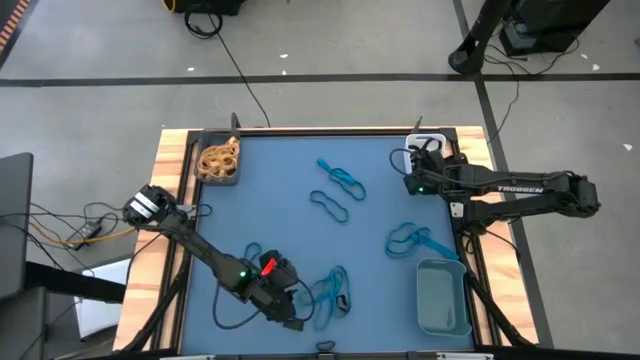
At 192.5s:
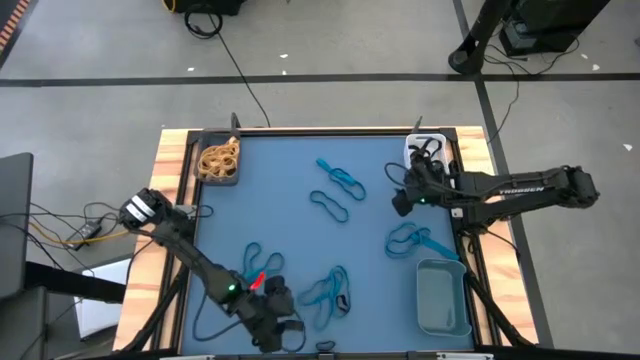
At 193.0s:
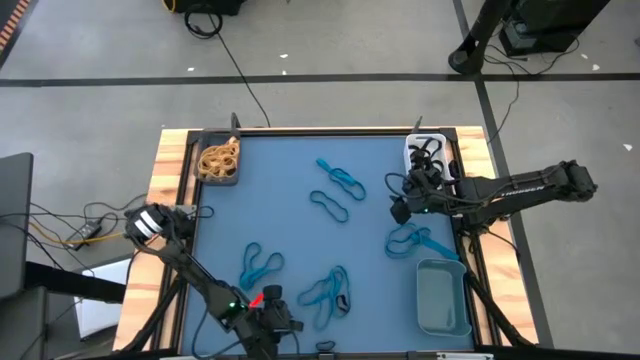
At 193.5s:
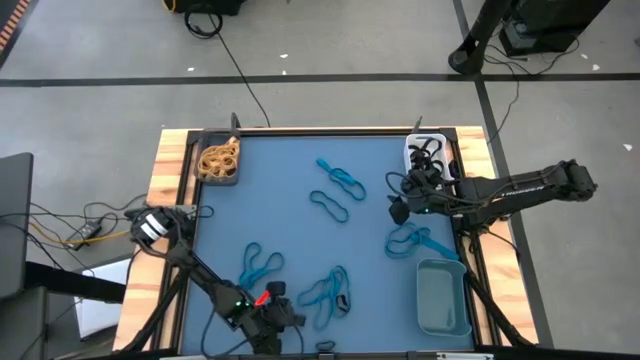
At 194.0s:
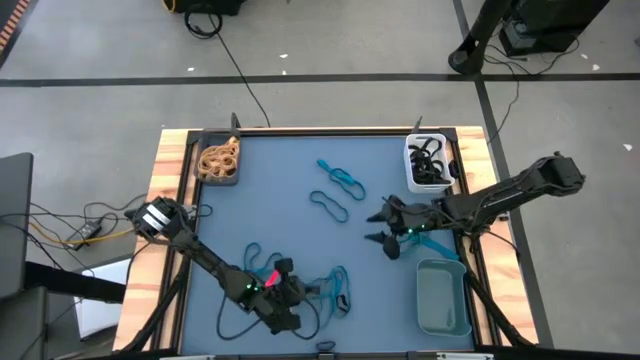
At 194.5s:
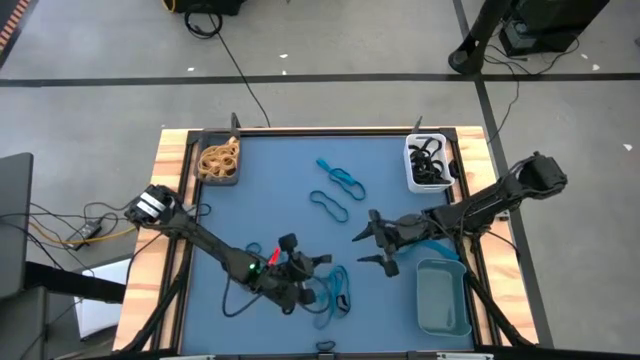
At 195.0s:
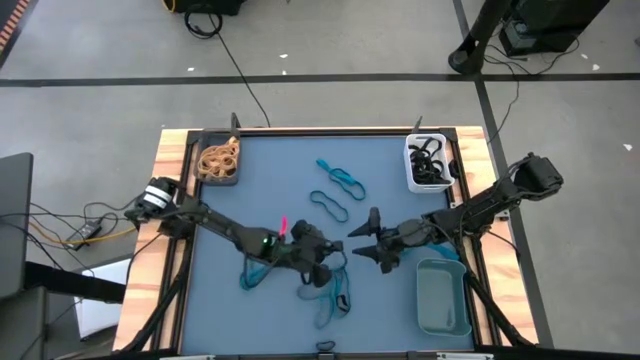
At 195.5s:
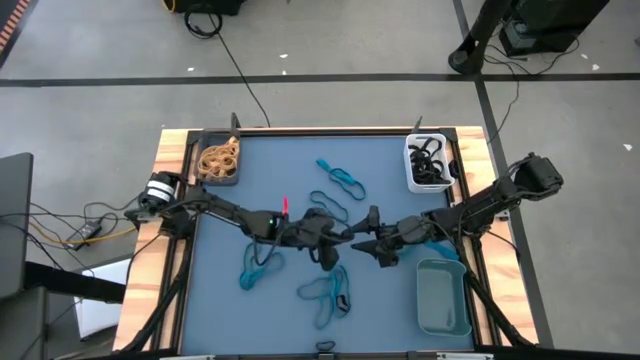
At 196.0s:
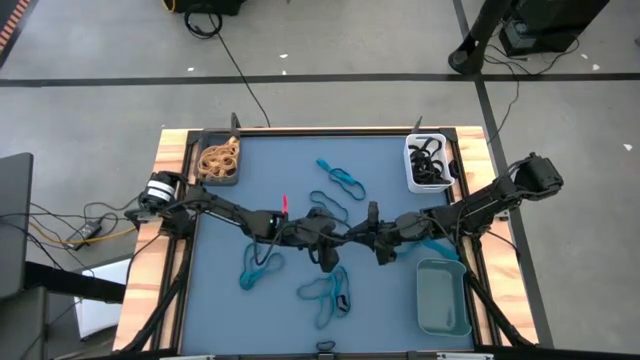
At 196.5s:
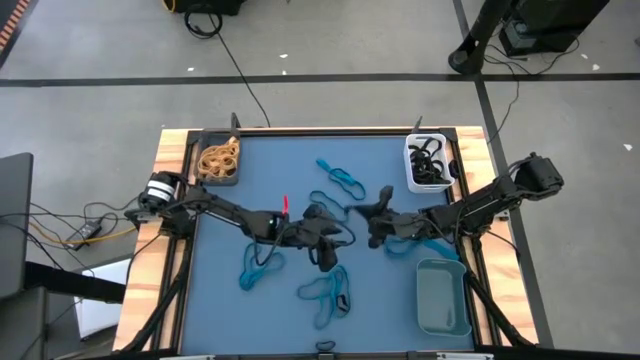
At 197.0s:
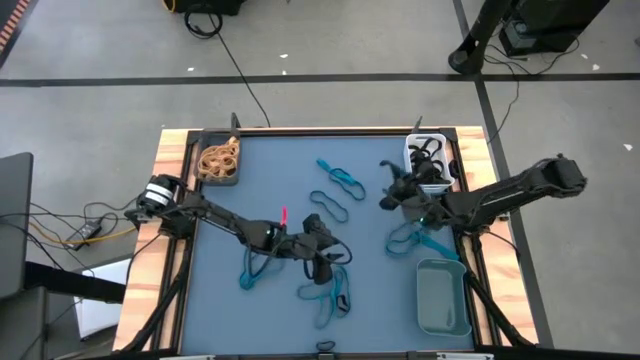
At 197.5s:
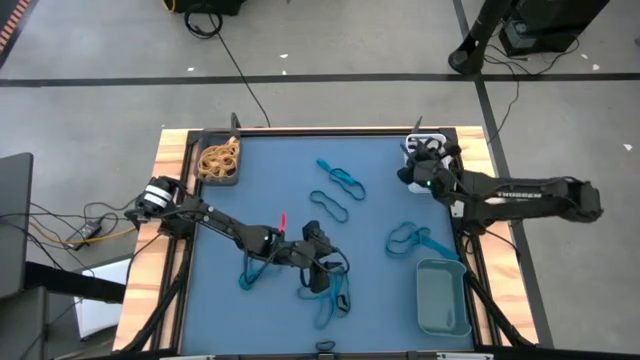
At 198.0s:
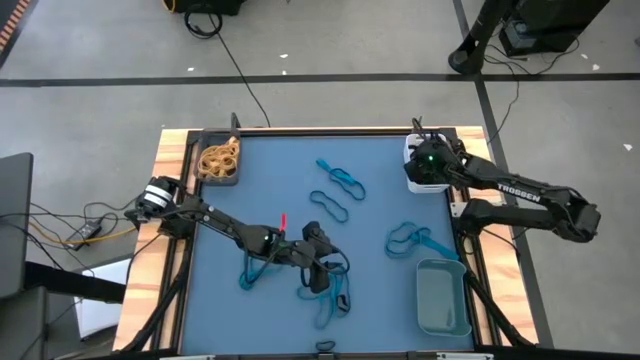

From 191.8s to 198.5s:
Task: Sort rubber bands into baskets
Put the black rubber band into the white bin

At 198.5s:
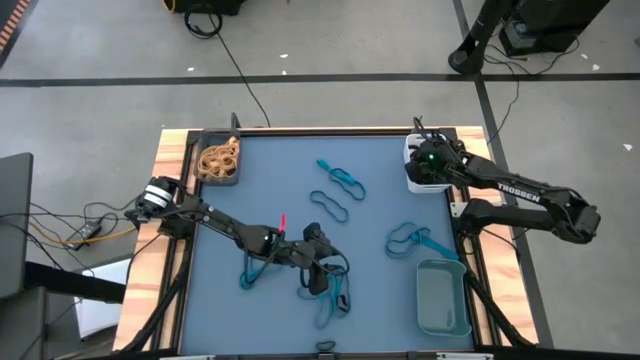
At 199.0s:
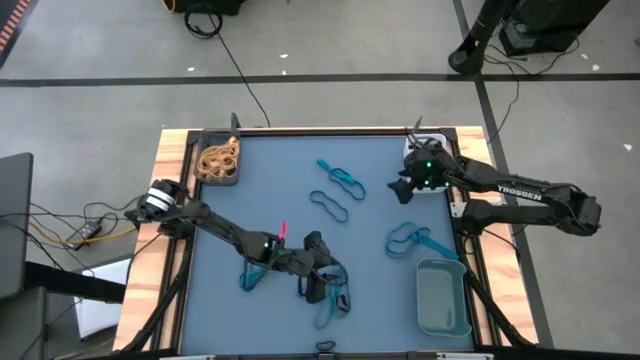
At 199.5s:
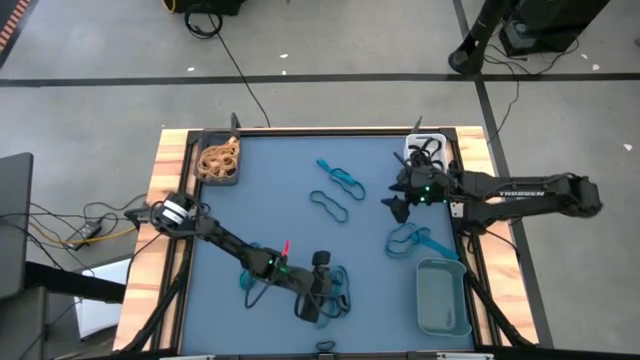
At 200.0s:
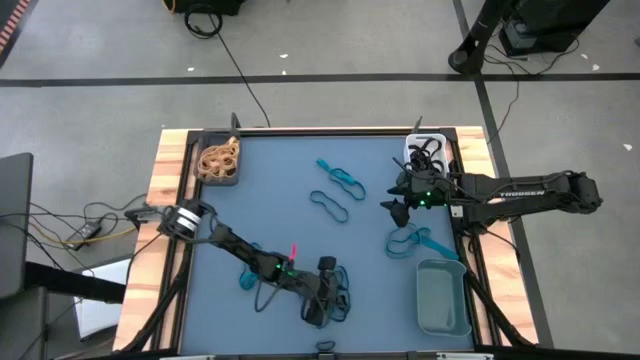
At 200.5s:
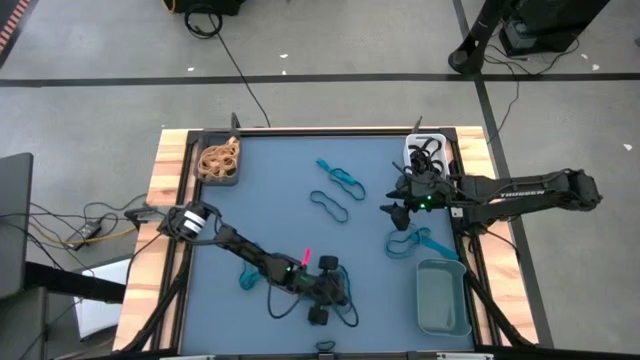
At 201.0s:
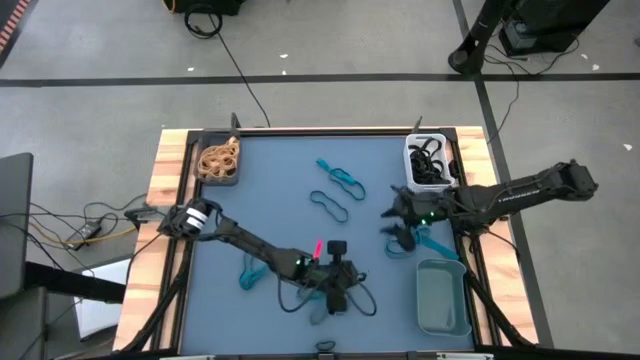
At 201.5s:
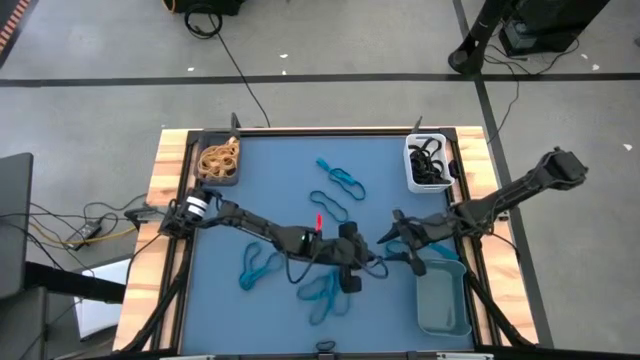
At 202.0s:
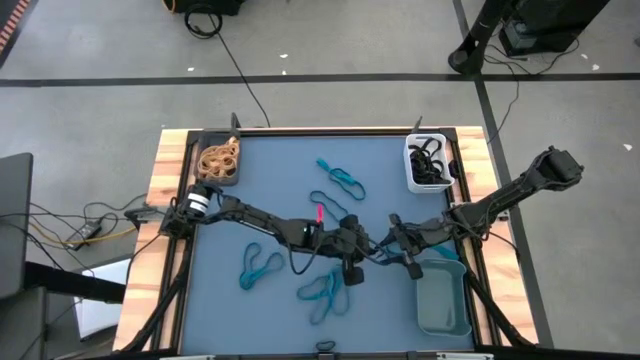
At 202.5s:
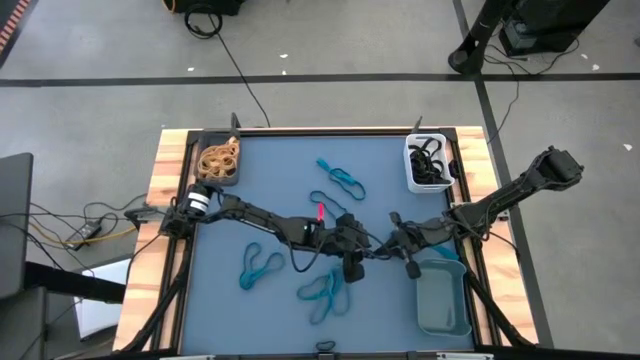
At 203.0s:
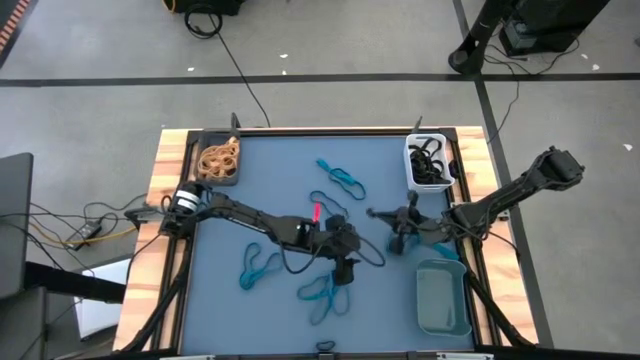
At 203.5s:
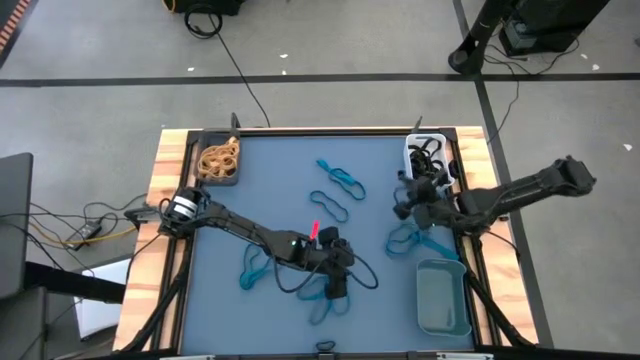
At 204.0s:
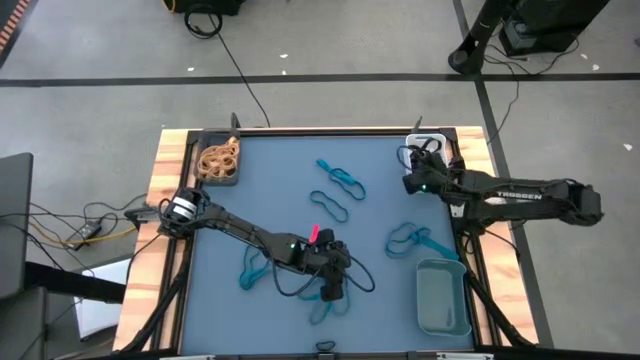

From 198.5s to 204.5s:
Put the black rubber band into the white bin

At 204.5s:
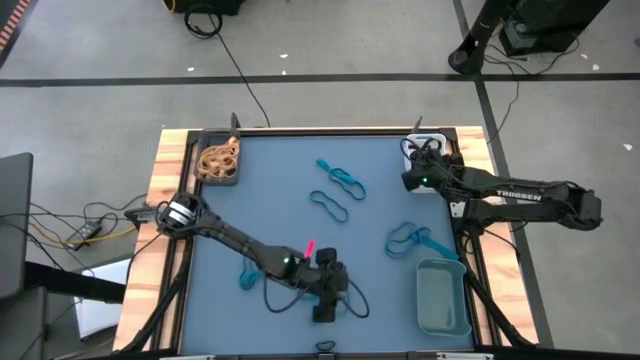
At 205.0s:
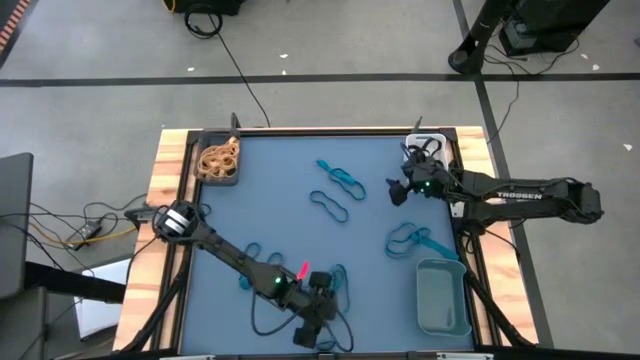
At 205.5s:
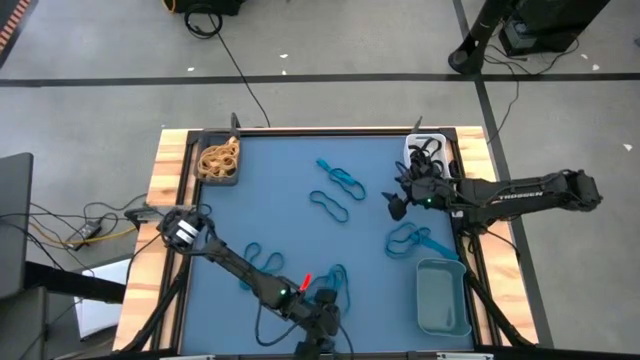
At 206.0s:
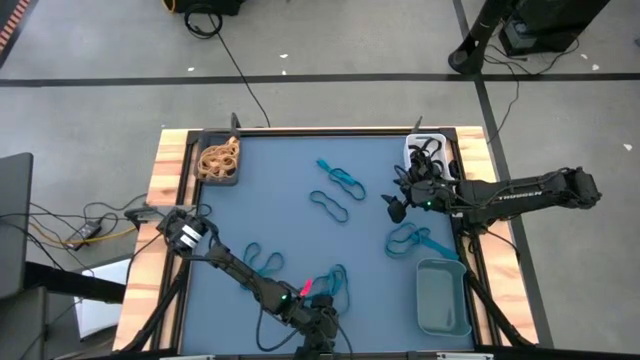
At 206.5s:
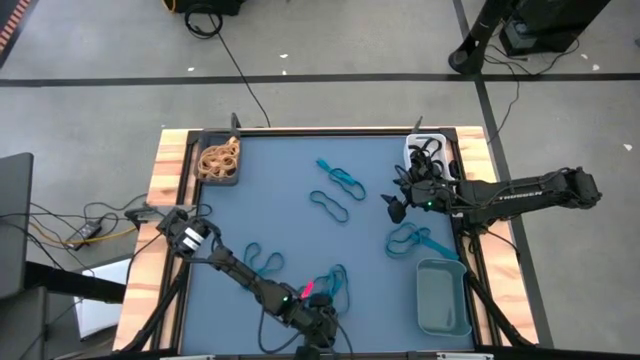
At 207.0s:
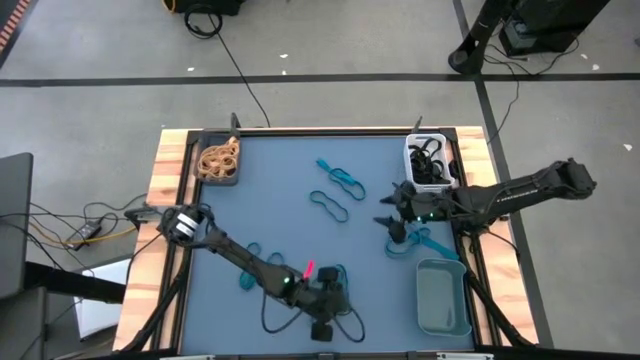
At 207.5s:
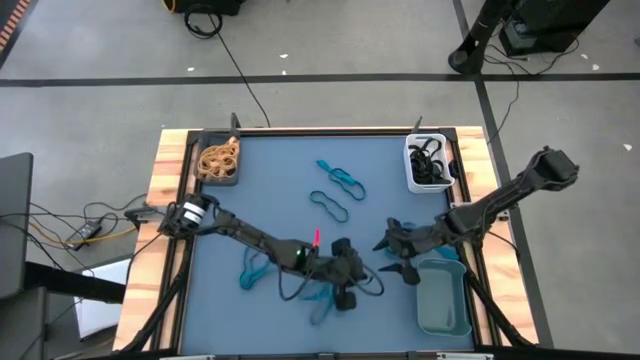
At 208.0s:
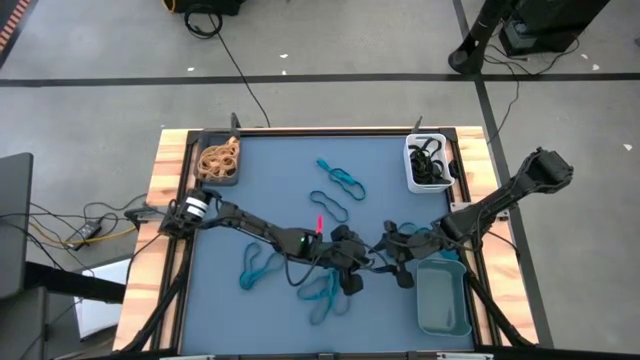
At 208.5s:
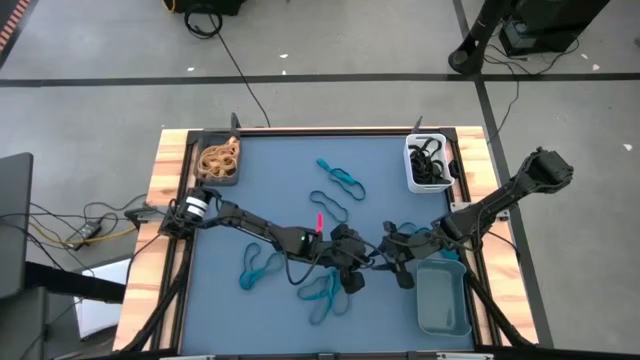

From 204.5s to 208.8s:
Put the black rubber band into the white bin

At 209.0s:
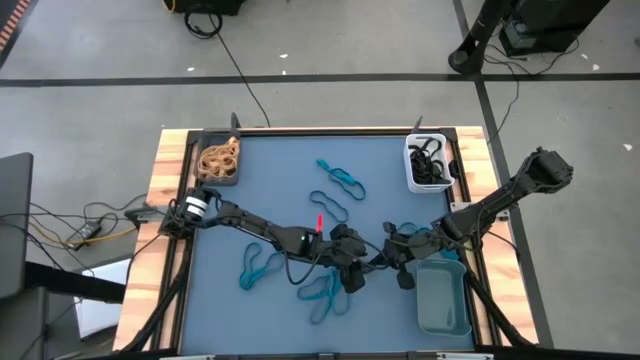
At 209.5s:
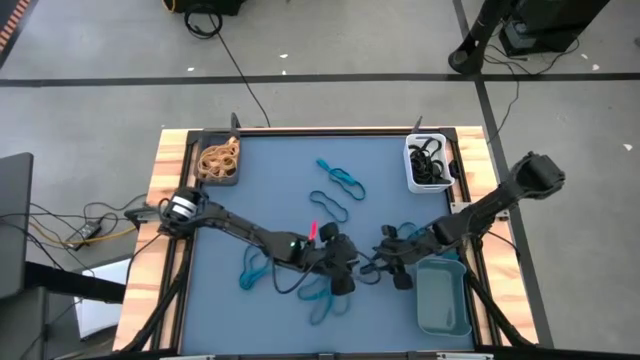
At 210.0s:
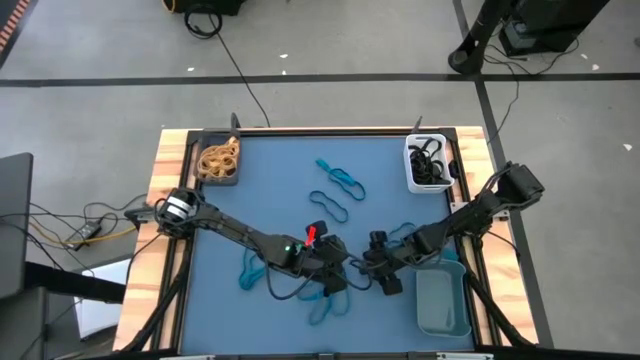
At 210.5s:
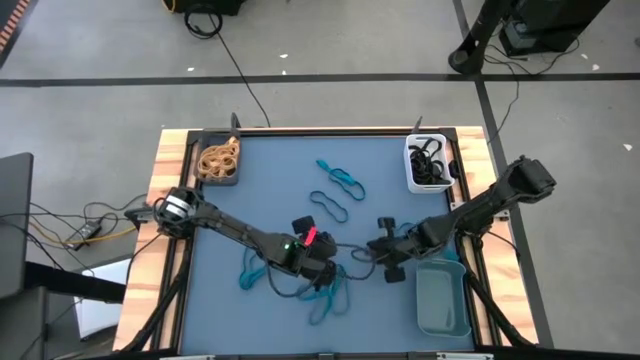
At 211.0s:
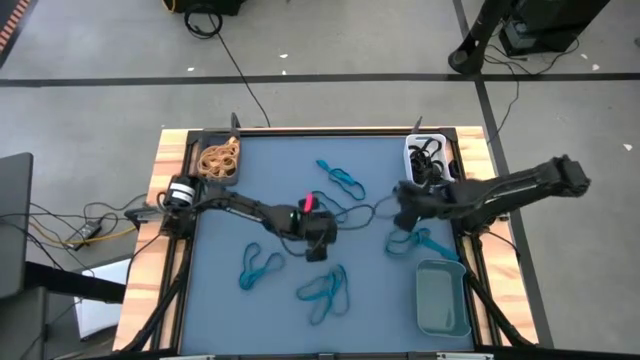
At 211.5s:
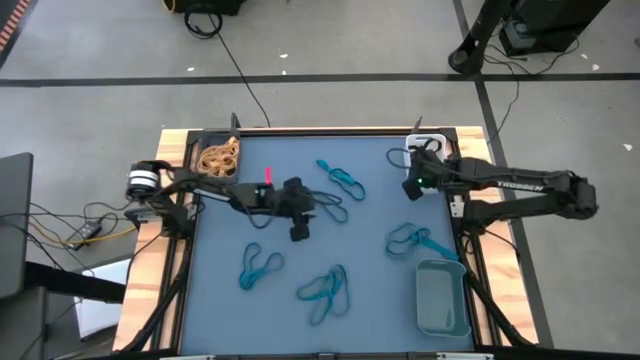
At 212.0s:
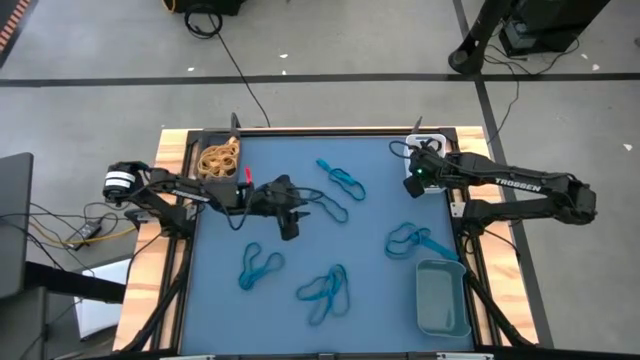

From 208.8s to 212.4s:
Put the black rubber band into the white bin

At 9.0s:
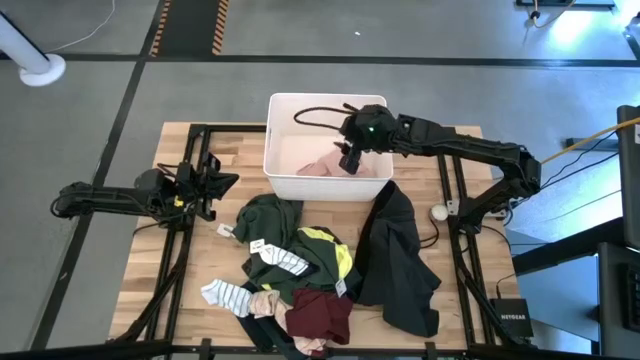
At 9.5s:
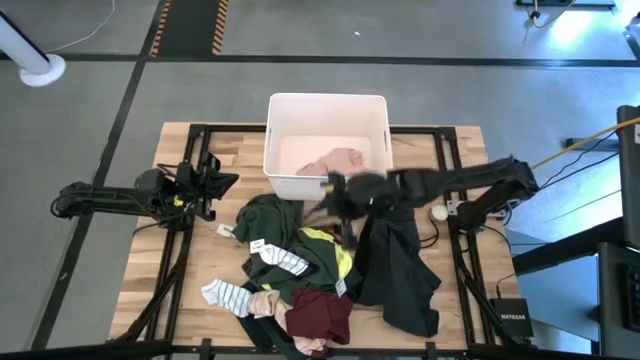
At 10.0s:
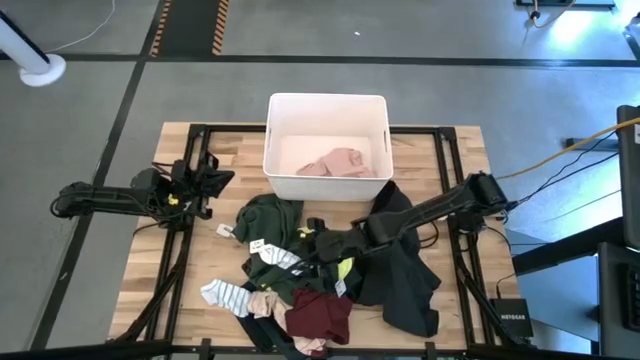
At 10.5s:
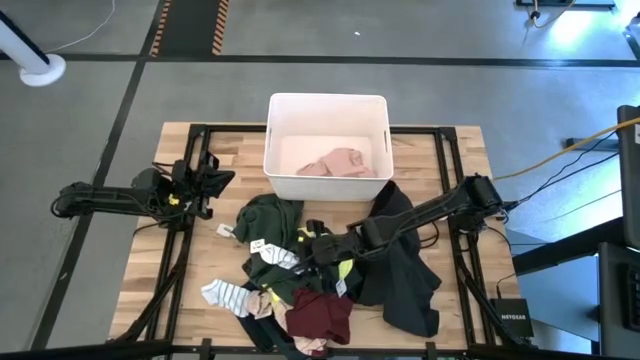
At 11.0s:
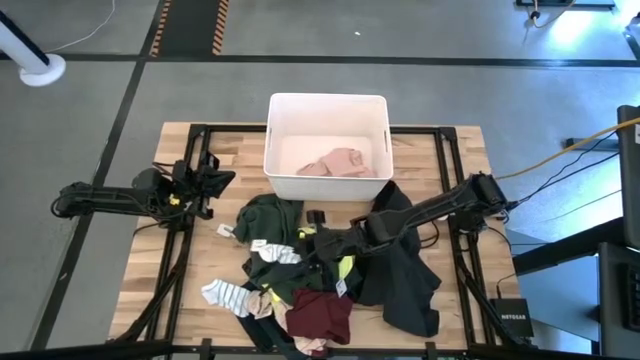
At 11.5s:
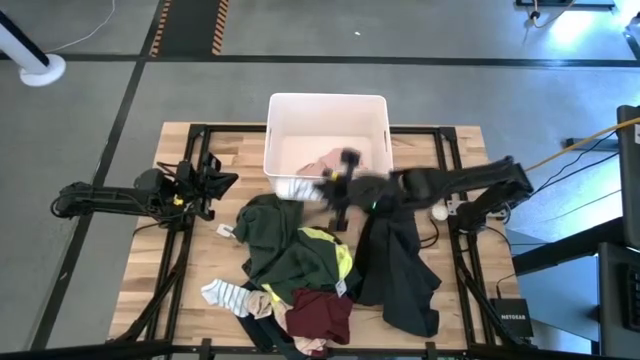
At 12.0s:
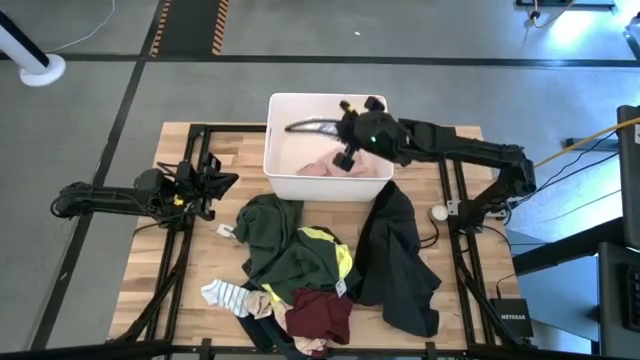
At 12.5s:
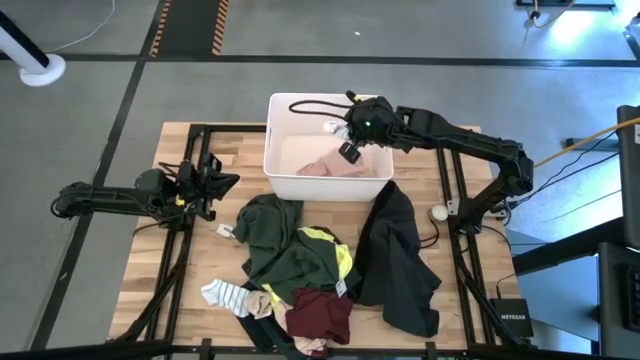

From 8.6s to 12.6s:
Task: Sort clothes
Put the top white sock into the white bin
